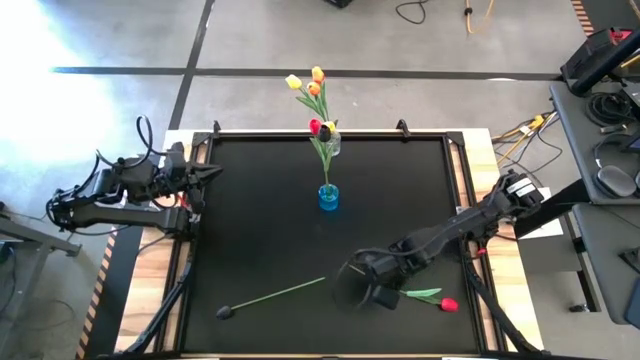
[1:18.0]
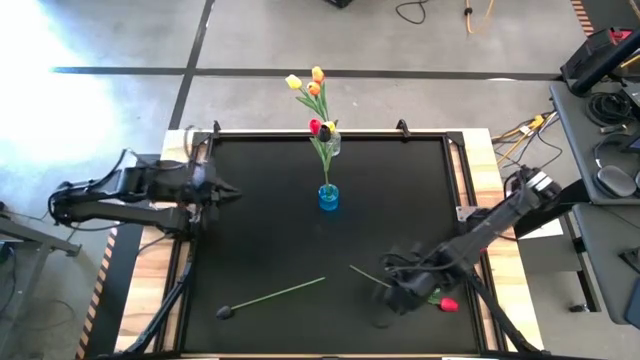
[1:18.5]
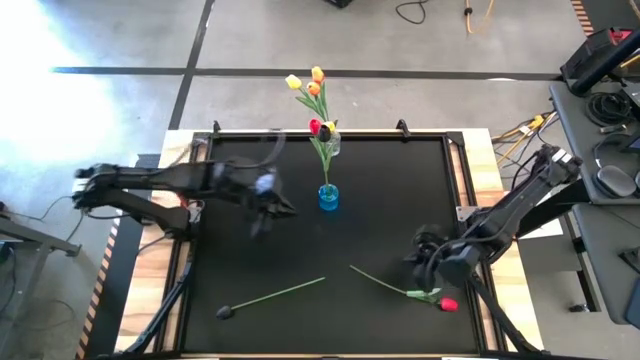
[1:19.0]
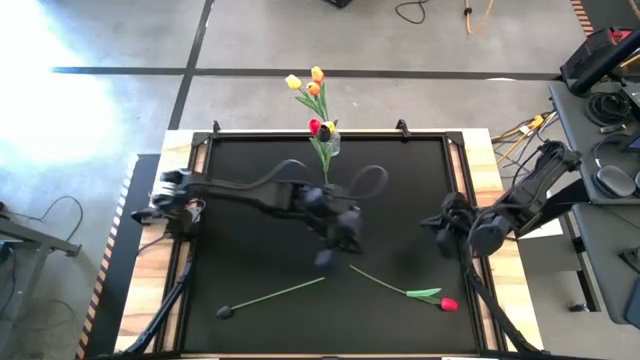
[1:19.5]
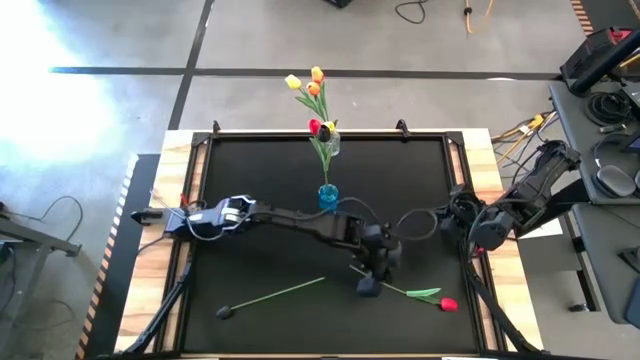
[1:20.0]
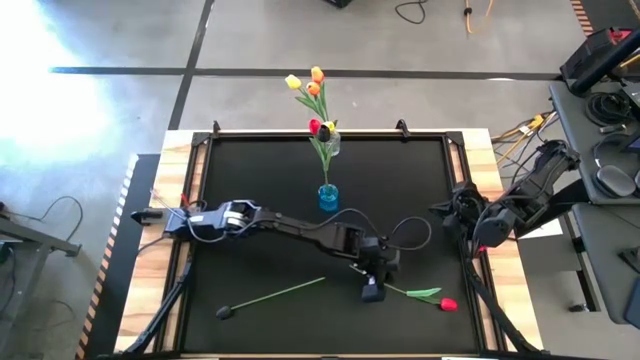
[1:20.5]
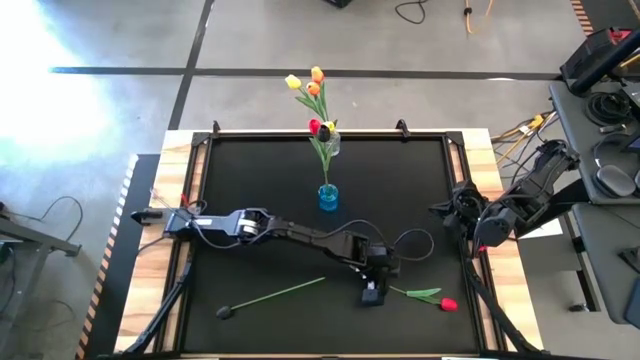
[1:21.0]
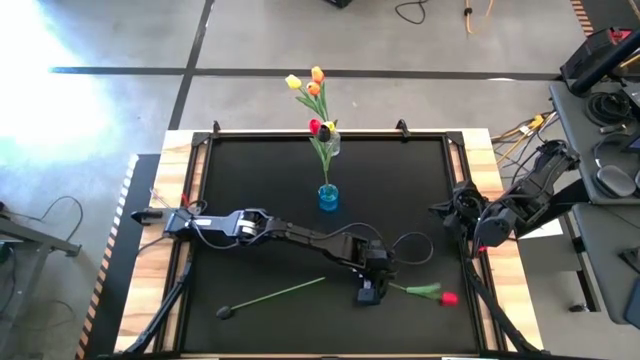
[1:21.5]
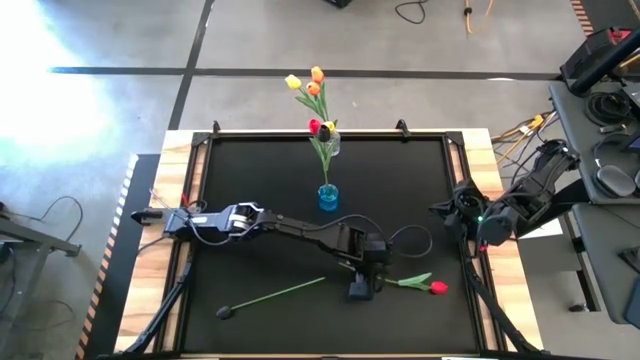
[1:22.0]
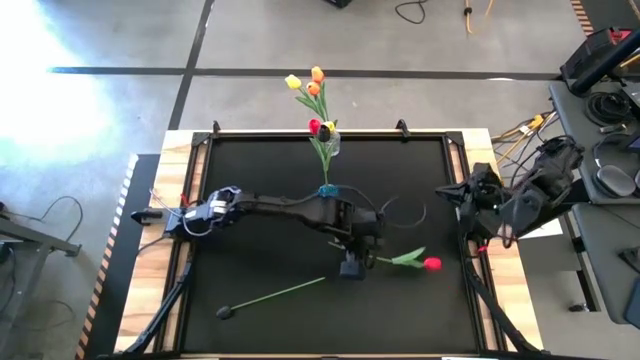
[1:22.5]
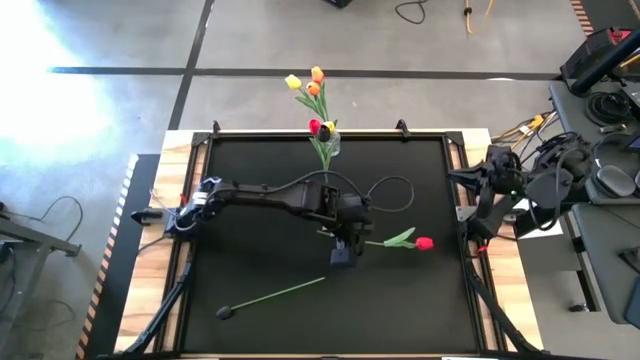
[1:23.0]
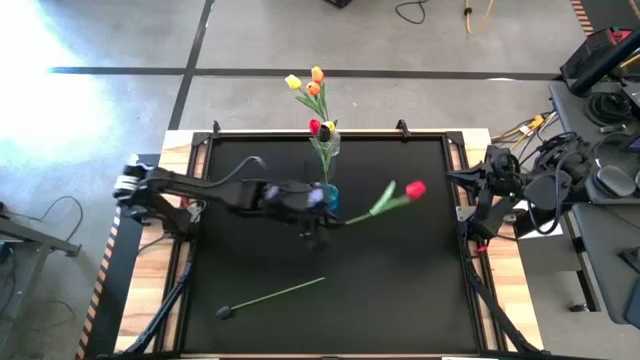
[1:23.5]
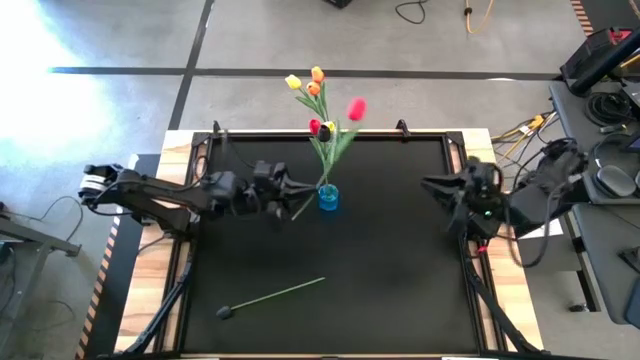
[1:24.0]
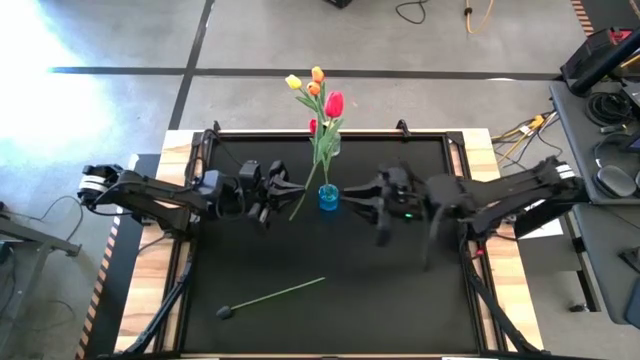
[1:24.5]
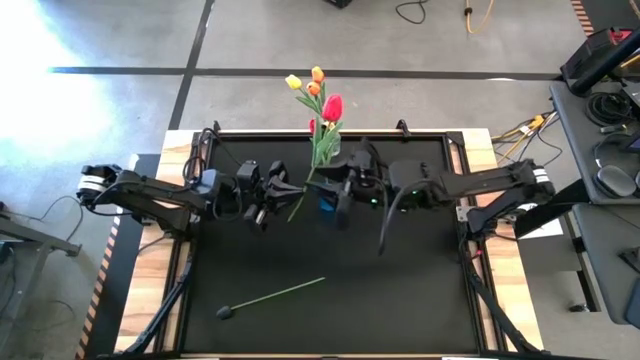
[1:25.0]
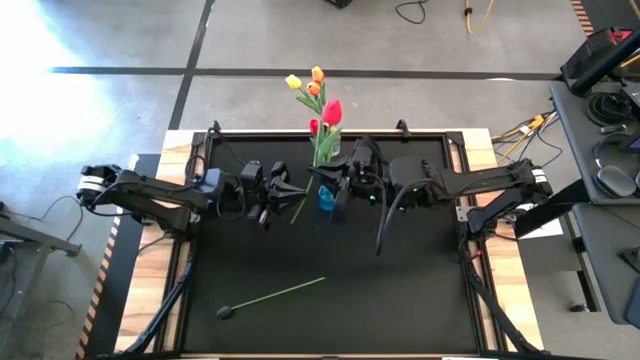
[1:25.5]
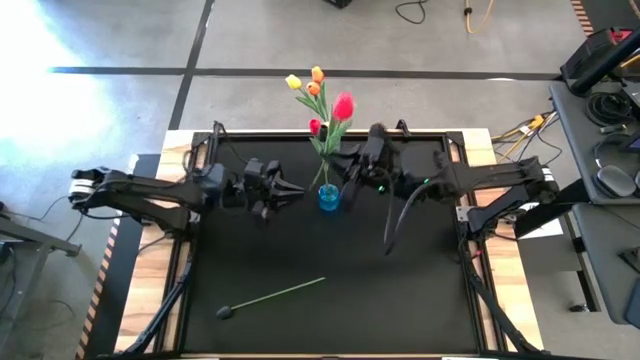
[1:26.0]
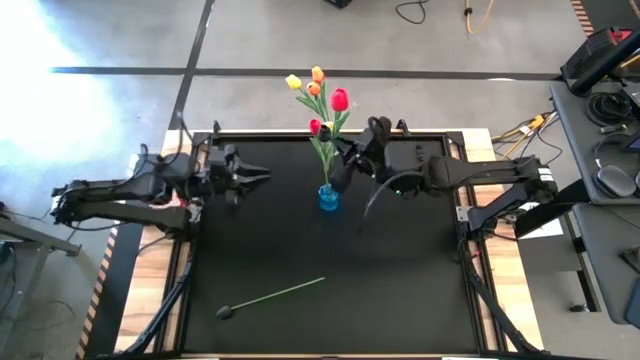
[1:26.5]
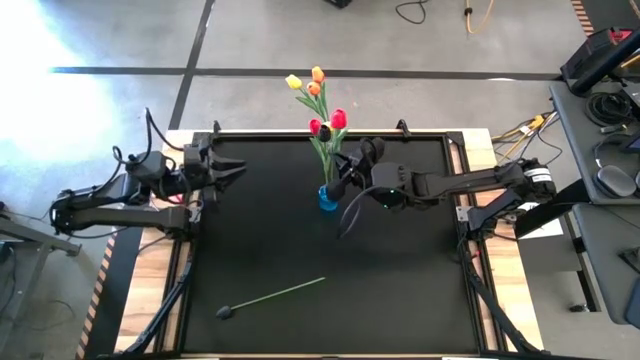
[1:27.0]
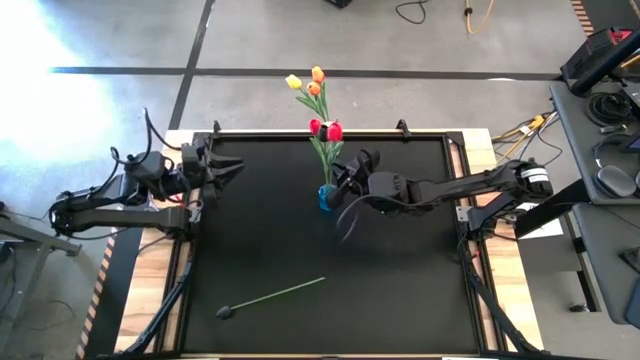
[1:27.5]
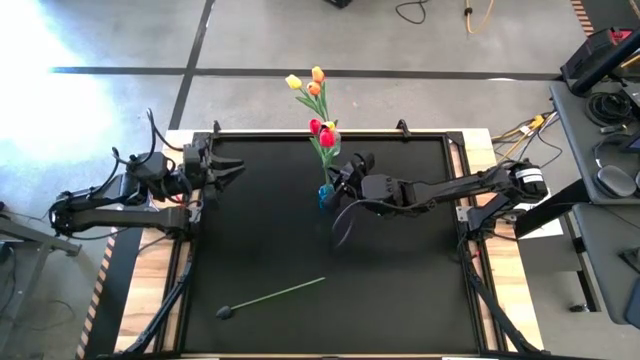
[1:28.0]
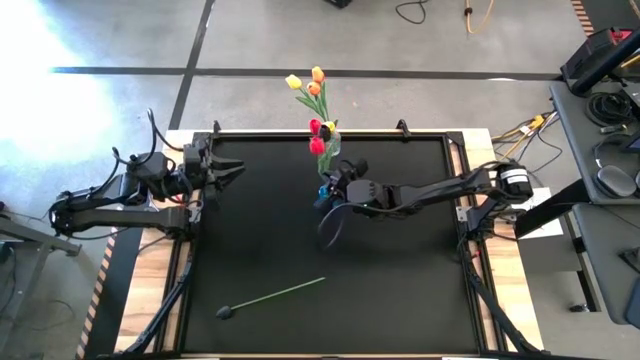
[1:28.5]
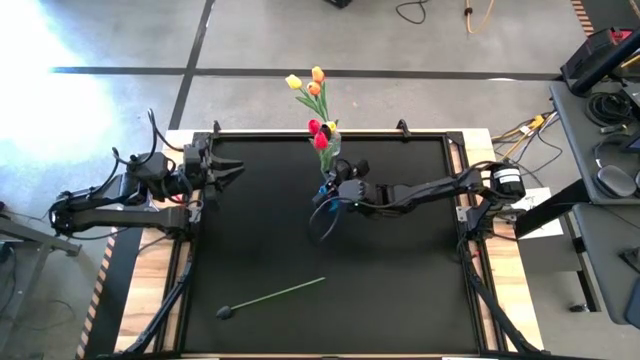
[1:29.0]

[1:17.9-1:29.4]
Task: Sort flowers into vase by color
Put the red tulip flower into the blue vase

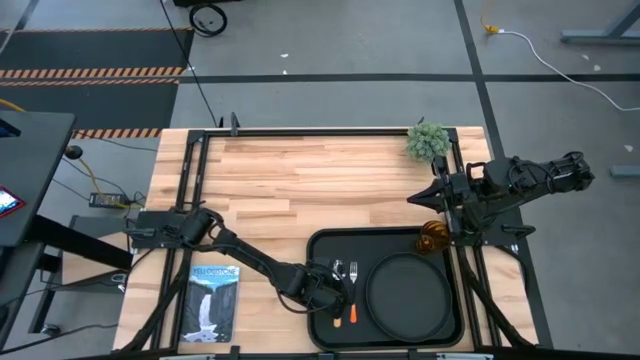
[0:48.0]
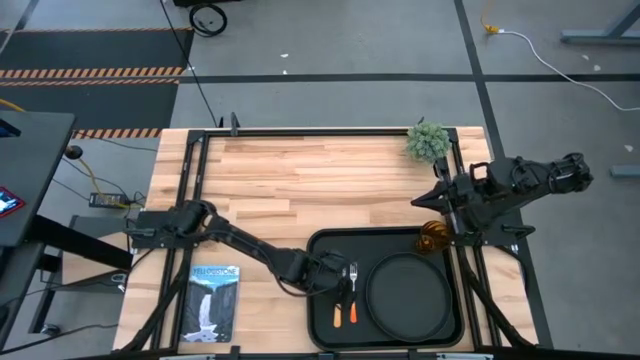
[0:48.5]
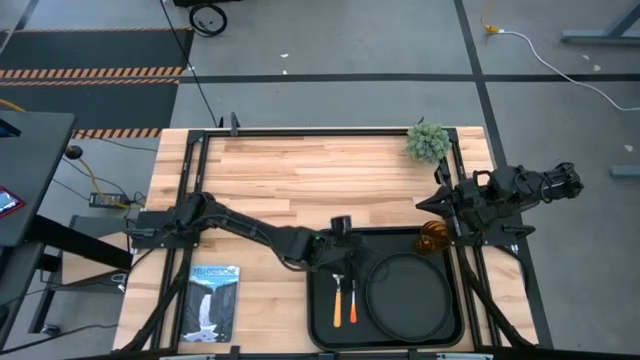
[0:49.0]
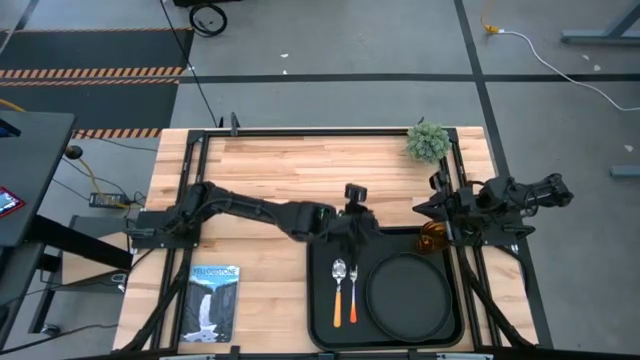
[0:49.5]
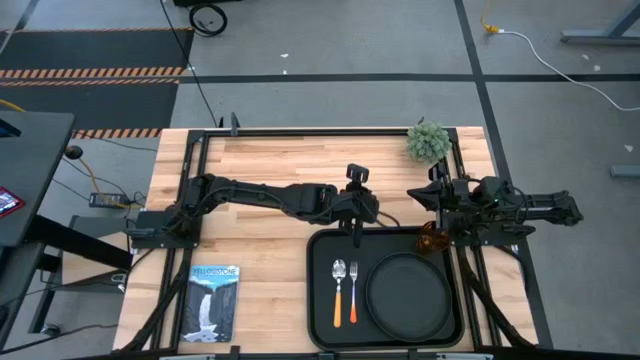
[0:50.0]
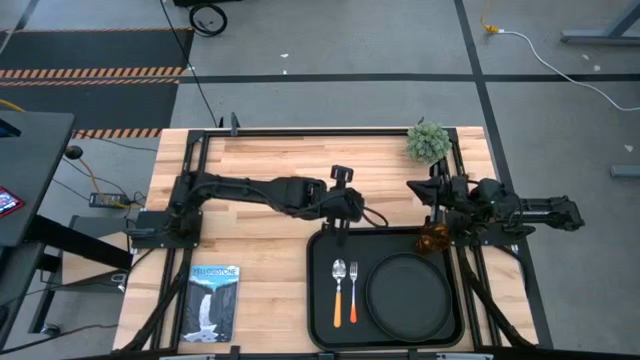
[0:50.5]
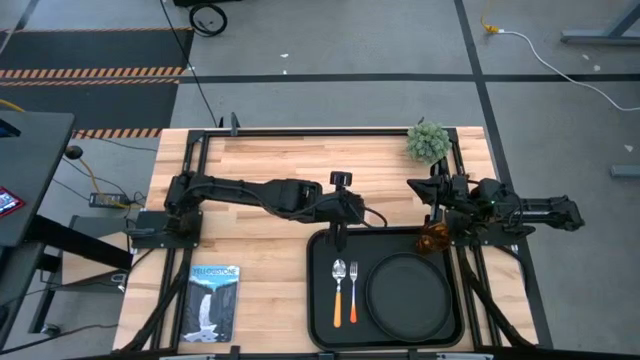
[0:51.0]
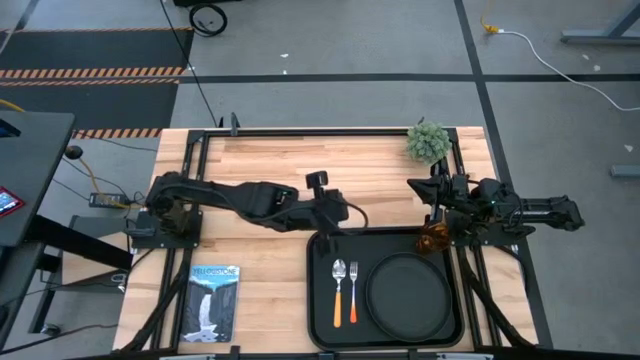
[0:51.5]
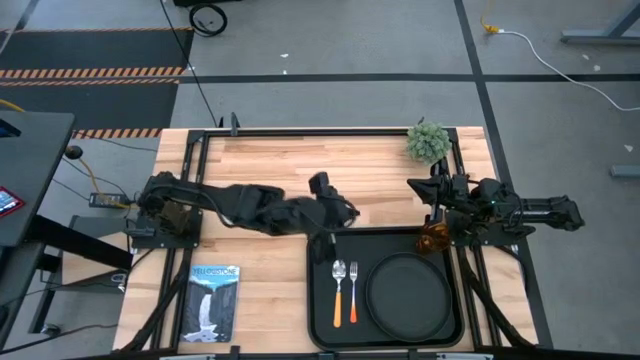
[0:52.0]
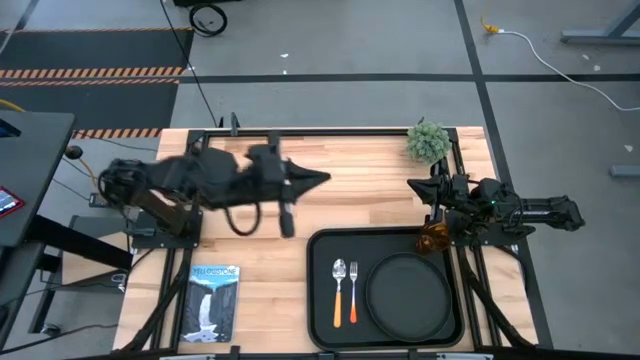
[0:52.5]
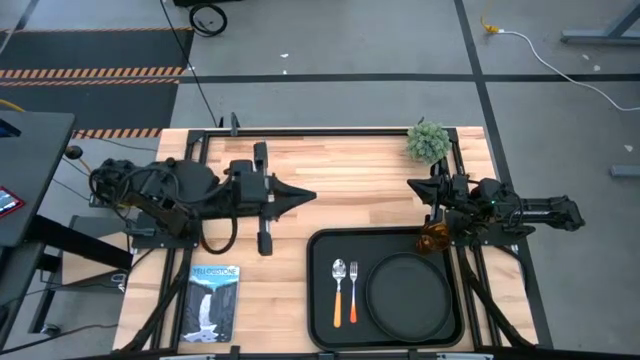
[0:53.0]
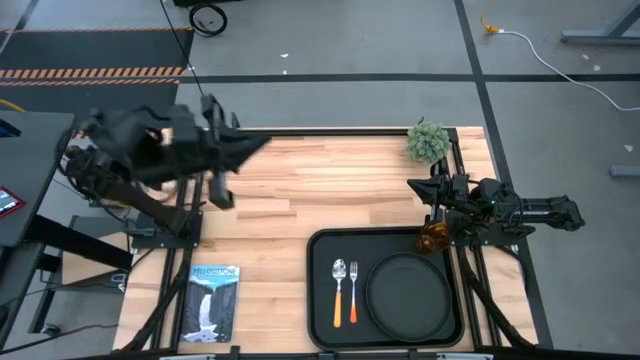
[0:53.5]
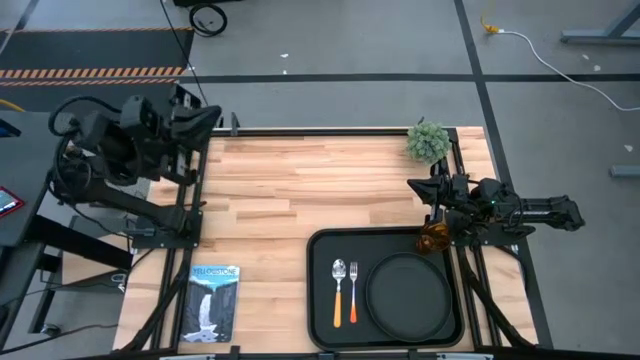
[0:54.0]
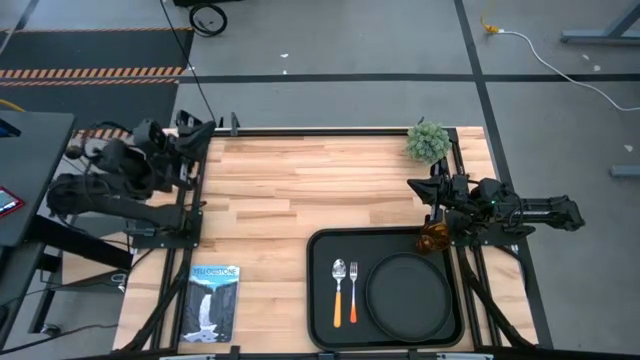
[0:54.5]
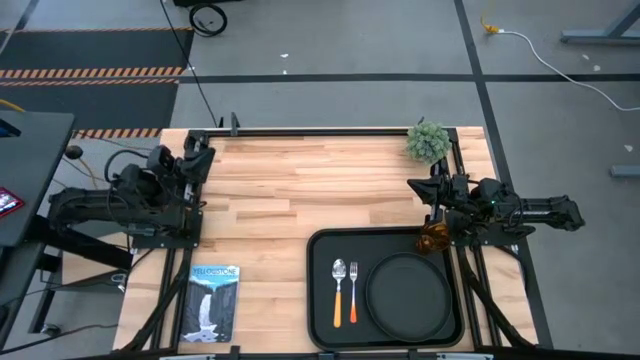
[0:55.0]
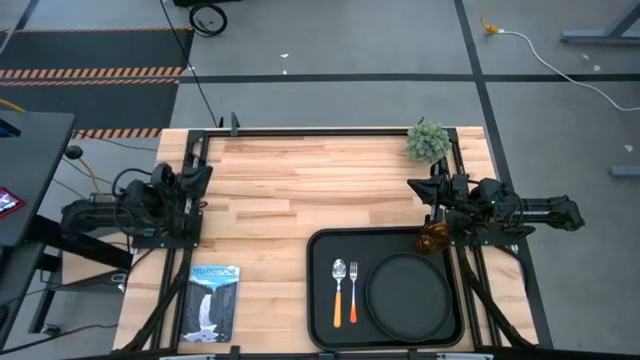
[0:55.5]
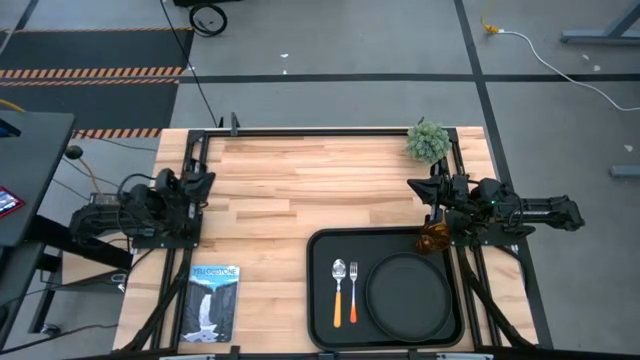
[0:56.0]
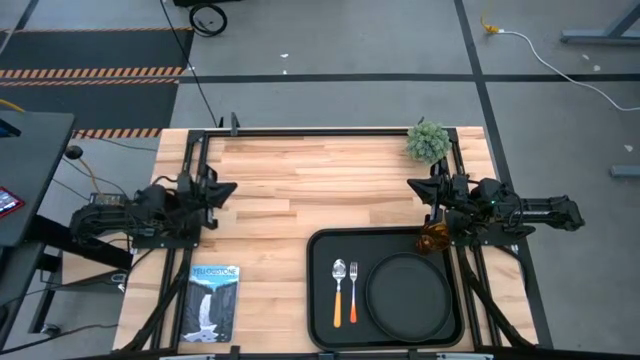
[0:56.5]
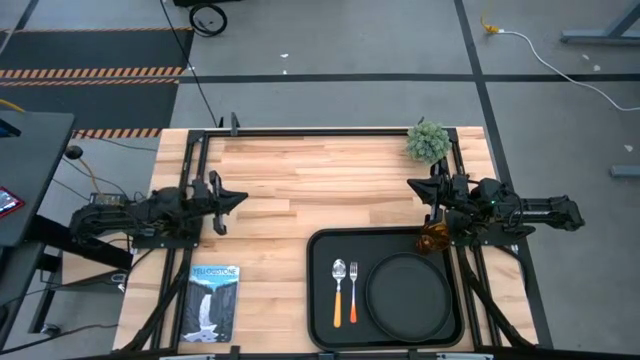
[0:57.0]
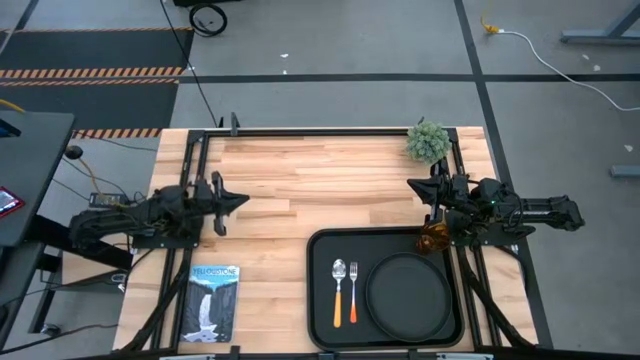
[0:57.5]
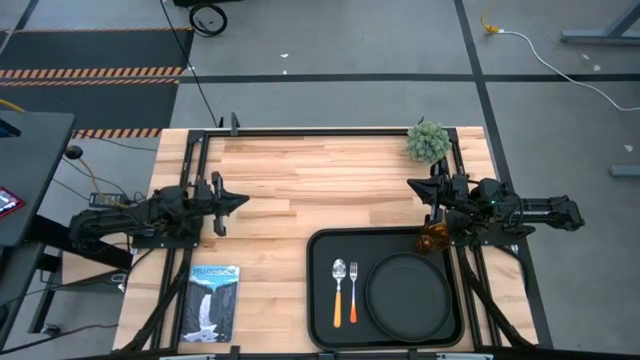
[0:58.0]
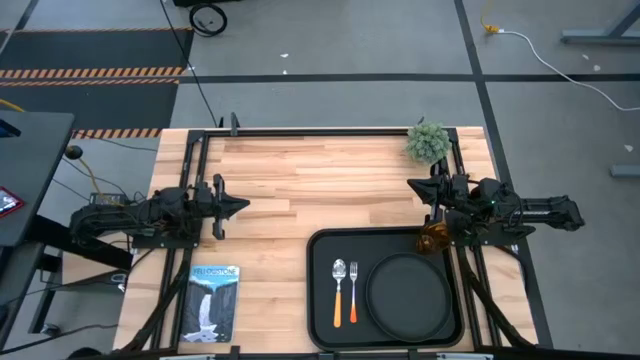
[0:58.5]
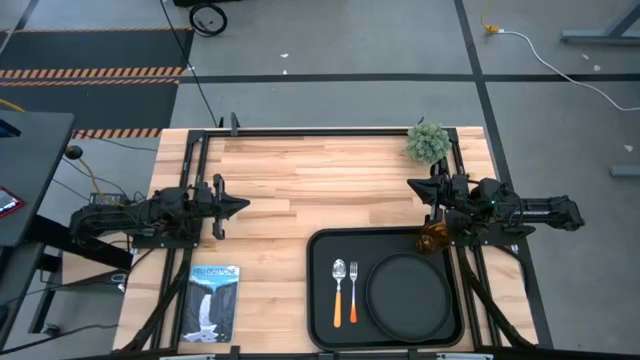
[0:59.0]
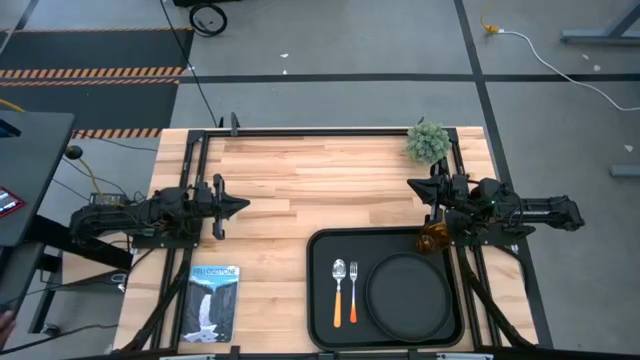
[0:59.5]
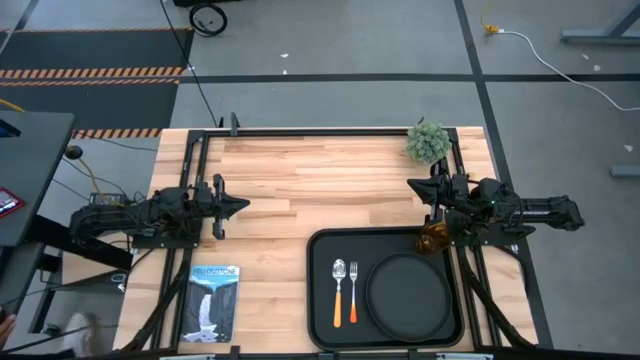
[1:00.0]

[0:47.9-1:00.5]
Task: Pick and place plate/cup/fork/spoon on tray
Return to Home Position
